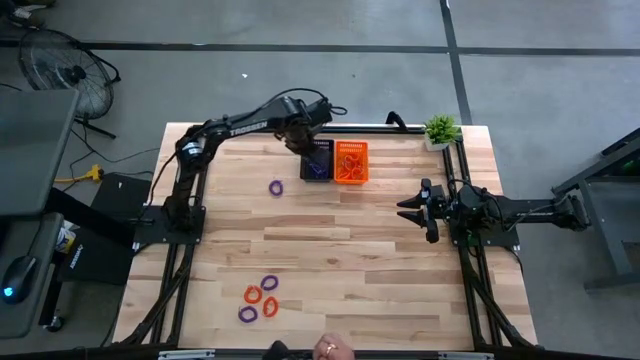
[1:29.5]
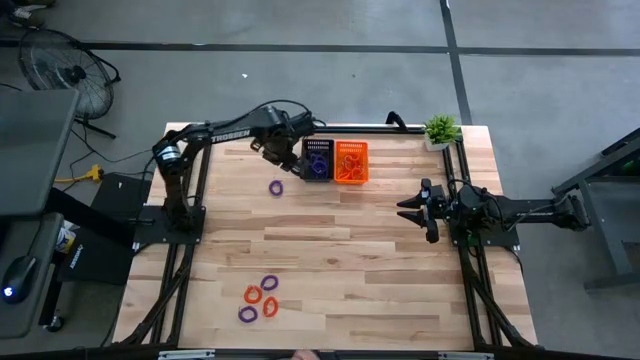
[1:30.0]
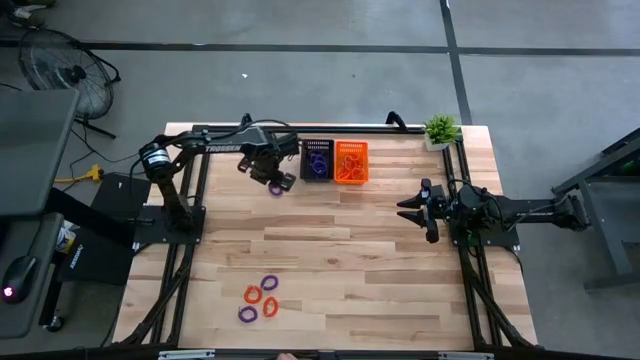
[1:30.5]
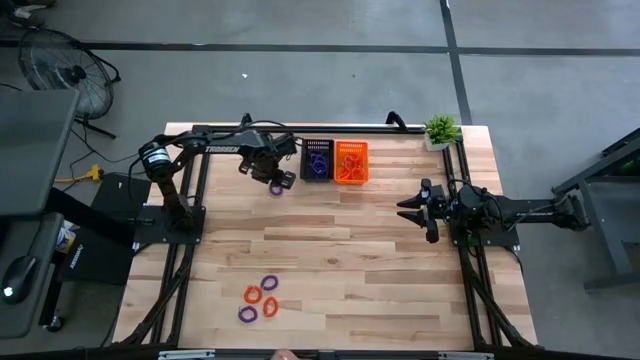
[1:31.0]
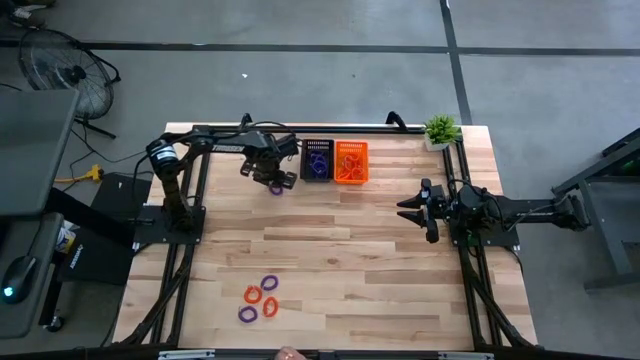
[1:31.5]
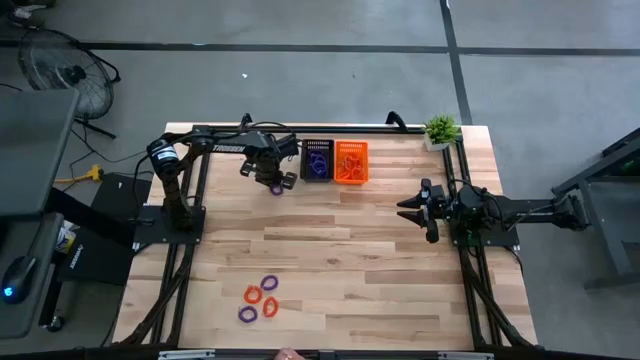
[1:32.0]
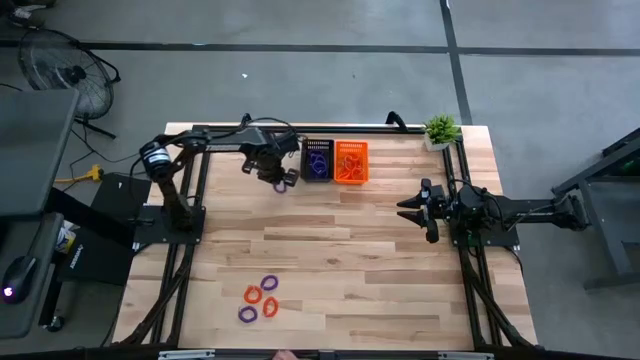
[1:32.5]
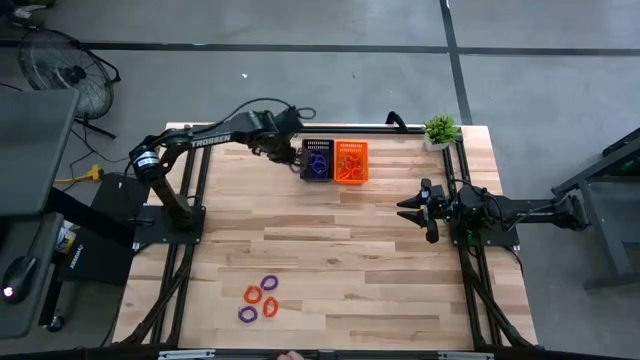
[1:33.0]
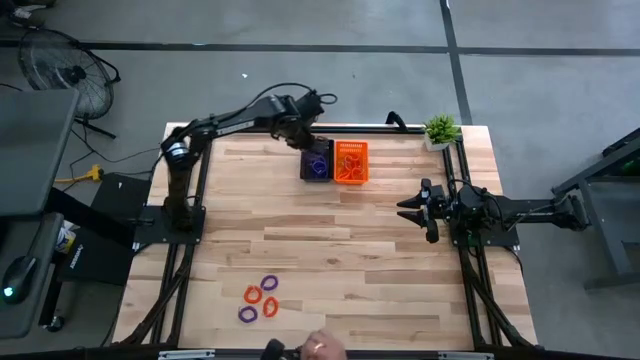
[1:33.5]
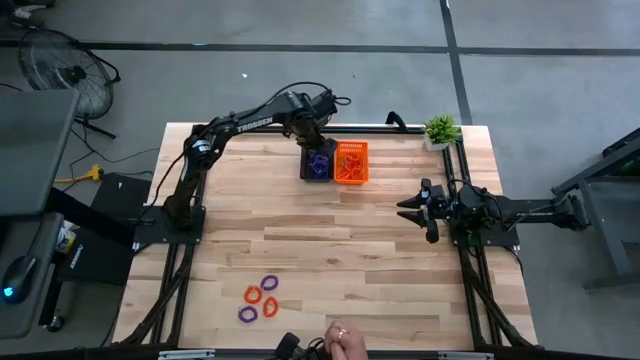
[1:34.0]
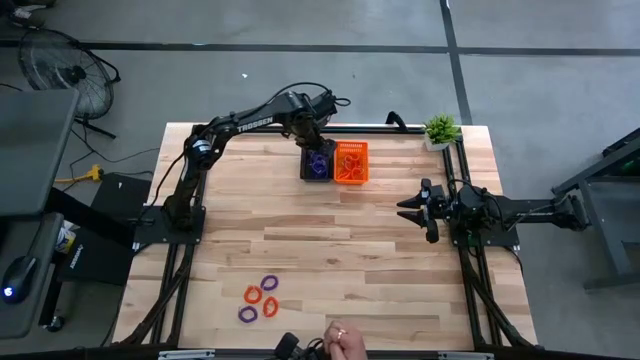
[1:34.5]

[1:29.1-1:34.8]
Task: Sort spring keychains
Put the top purple spring keychain in the black bin

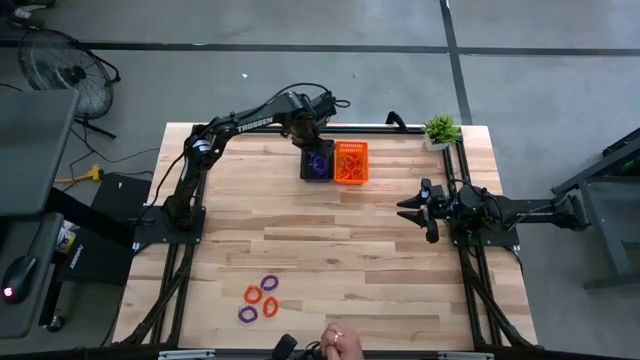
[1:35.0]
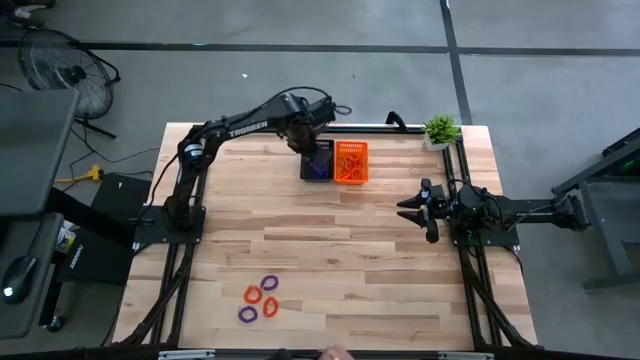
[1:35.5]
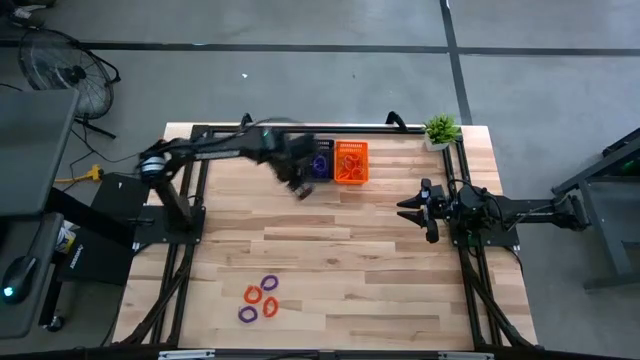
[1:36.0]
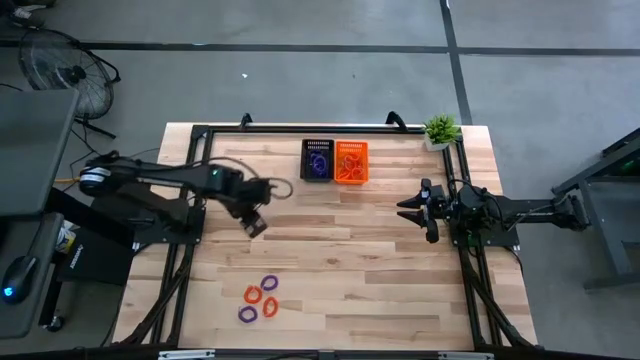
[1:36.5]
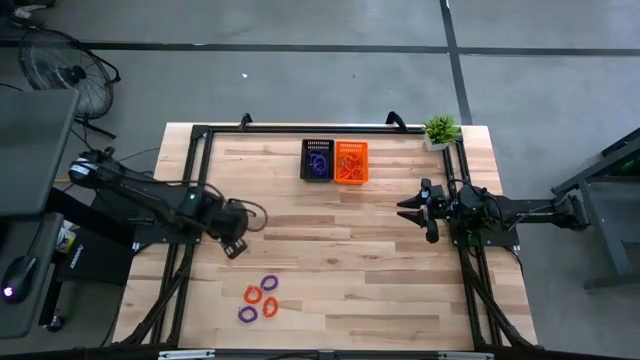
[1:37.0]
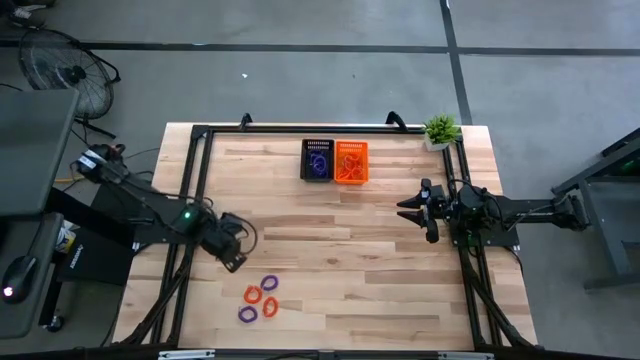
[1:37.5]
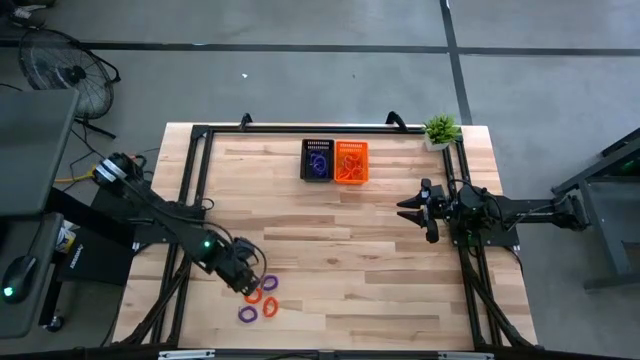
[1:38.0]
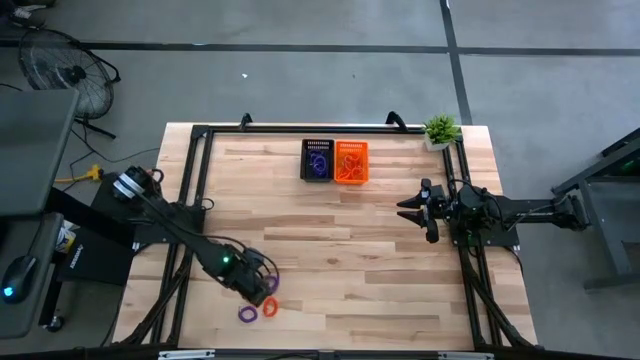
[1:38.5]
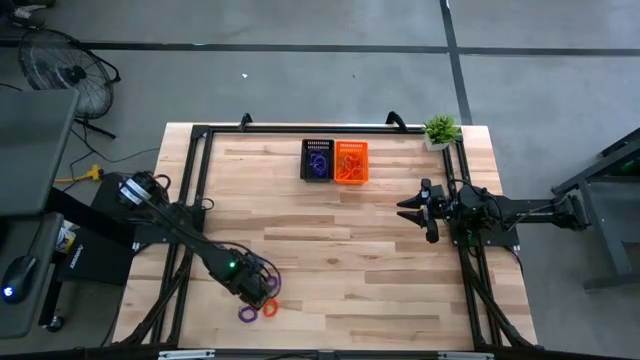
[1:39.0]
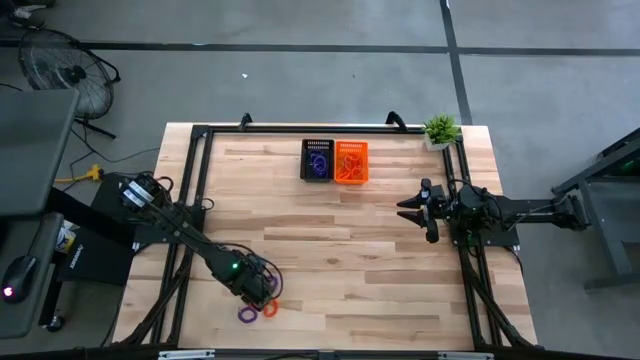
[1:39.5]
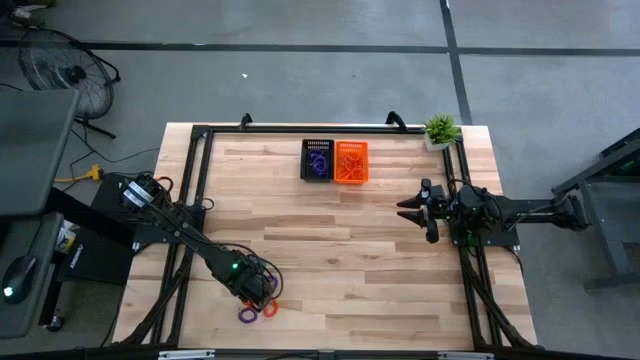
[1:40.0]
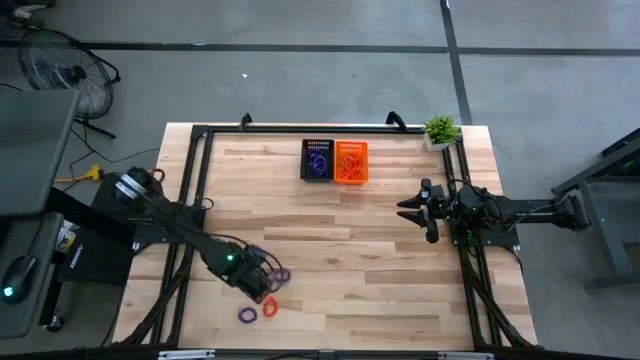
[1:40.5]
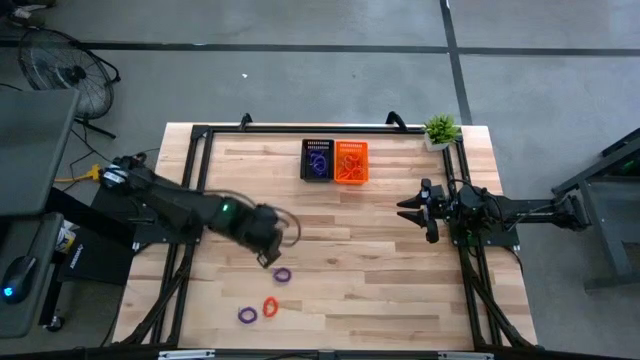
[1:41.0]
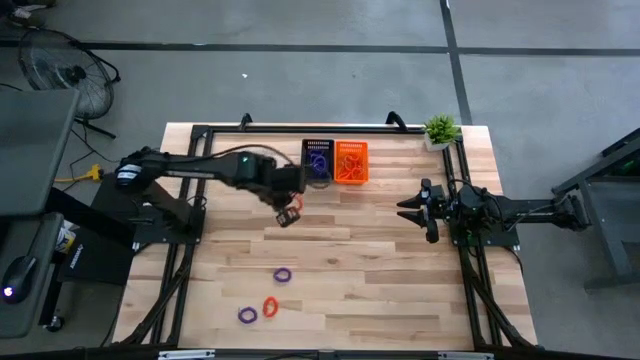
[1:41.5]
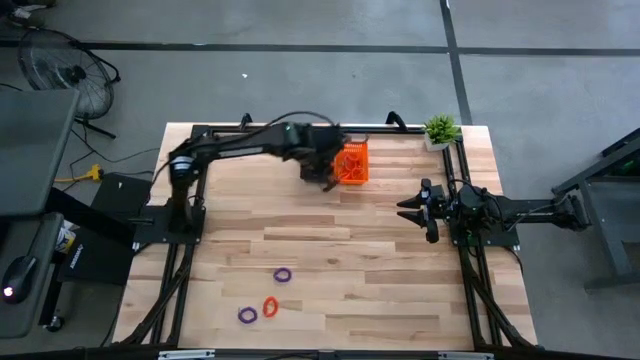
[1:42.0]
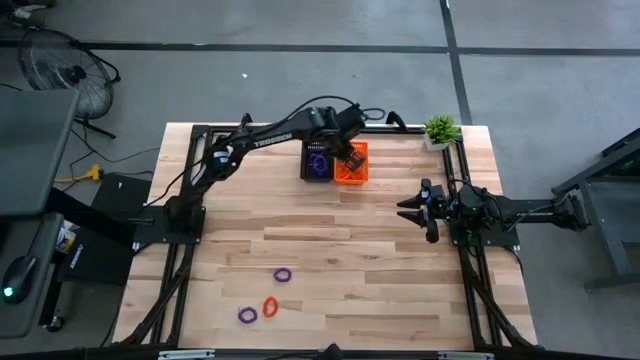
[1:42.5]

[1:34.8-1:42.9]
Put the top orange spring keychain in the orange bin

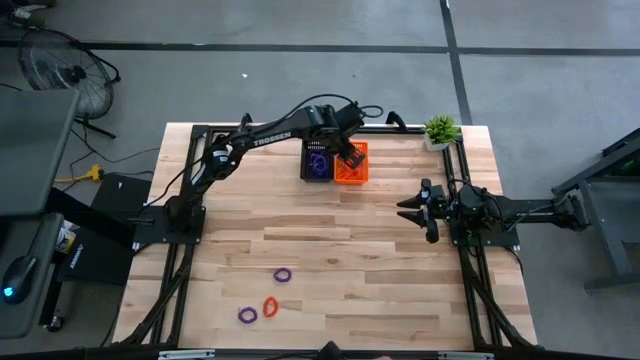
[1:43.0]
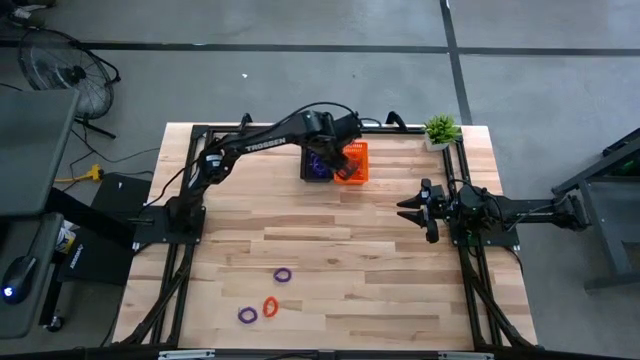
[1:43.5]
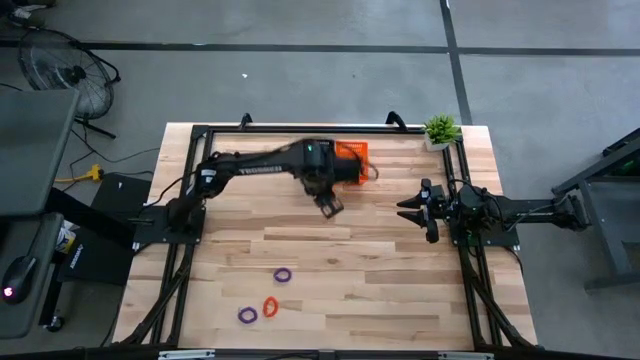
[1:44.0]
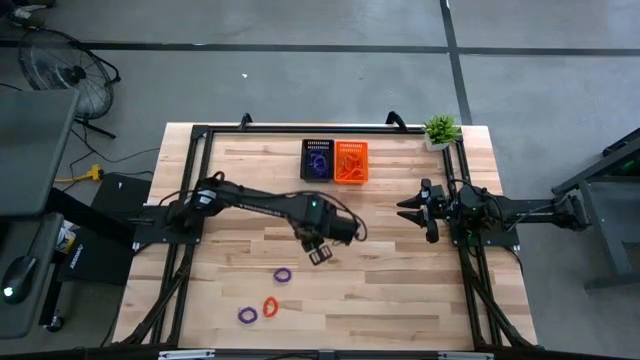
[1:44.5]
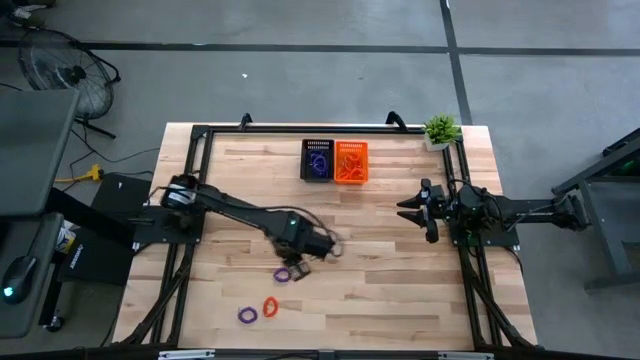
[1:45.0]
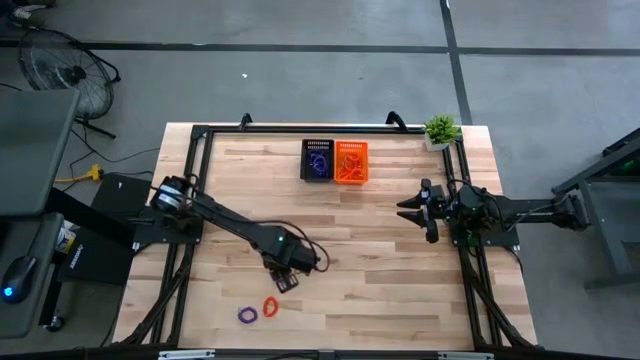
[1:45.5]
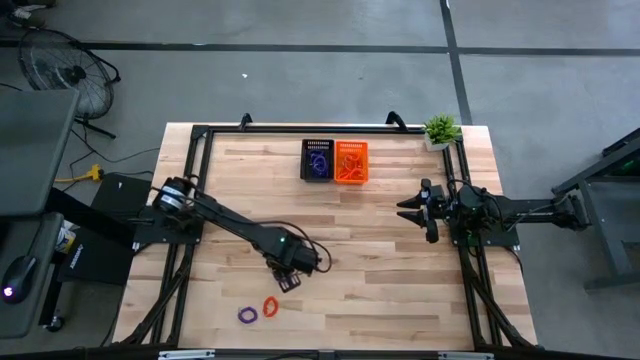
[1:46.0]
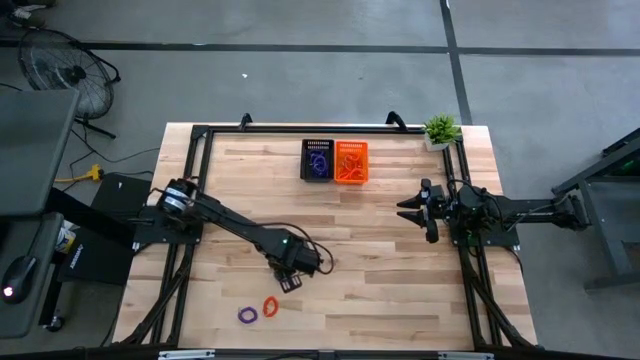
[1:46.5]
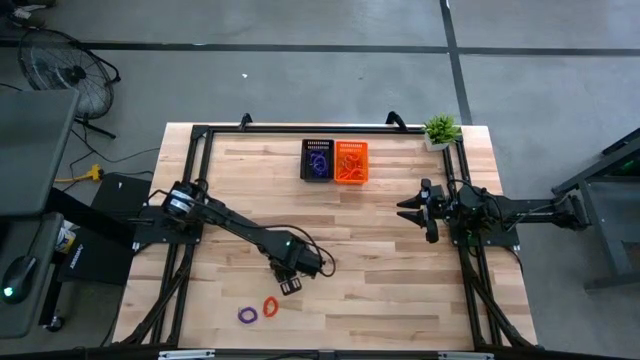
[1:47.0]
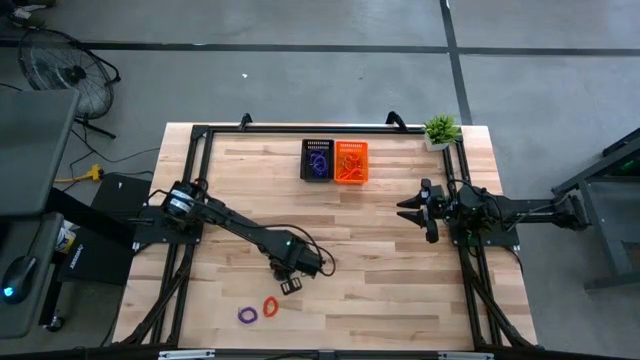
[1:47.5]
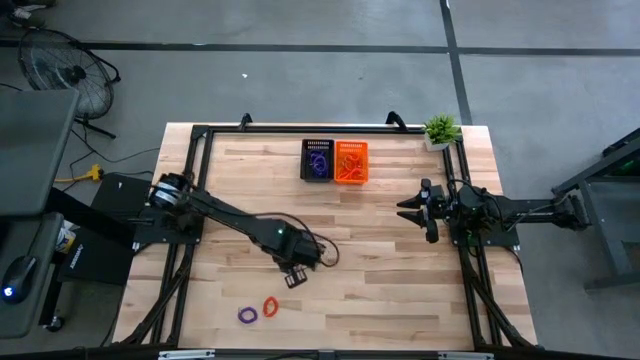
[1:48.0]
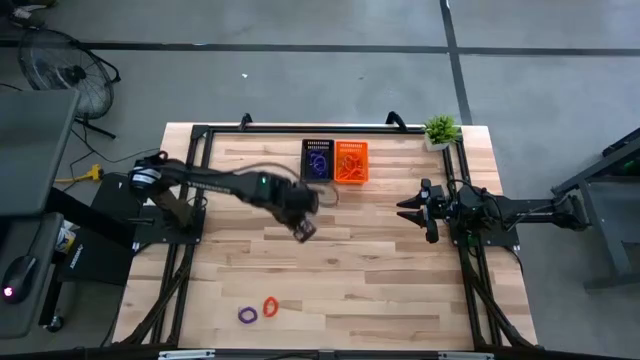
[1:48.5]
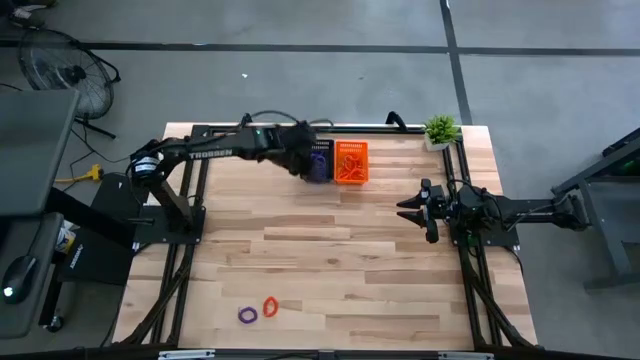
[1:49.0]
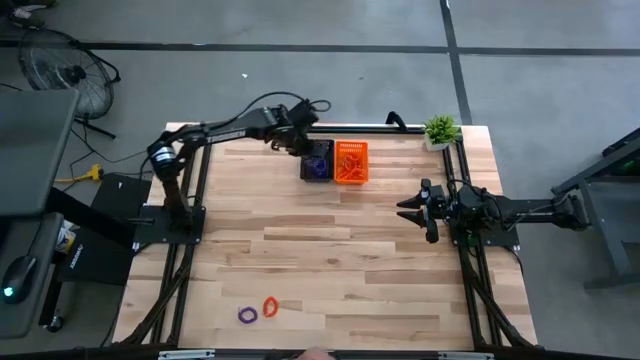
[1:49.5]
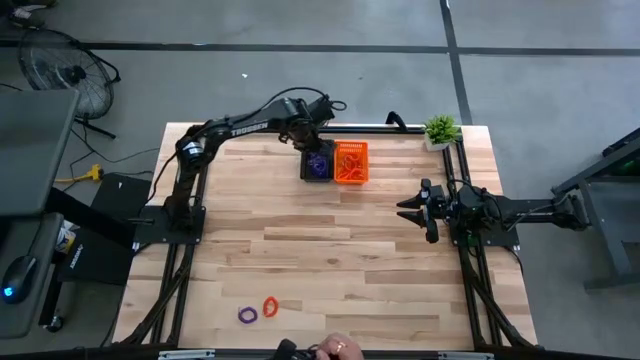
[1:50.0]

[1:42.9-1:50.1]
Put the top purple spring keychain in the black bin
